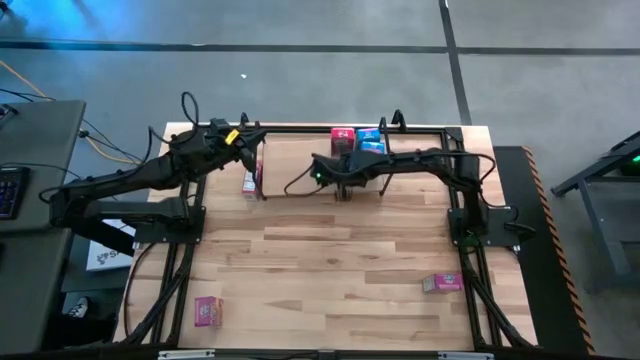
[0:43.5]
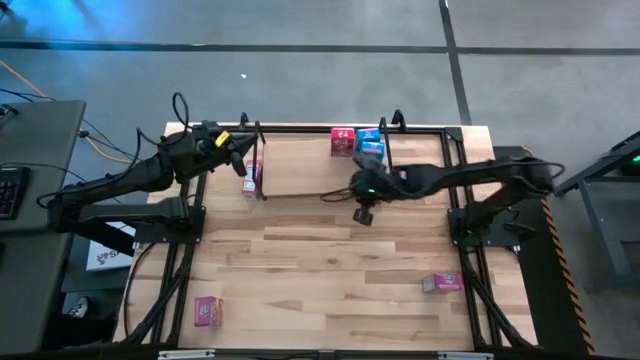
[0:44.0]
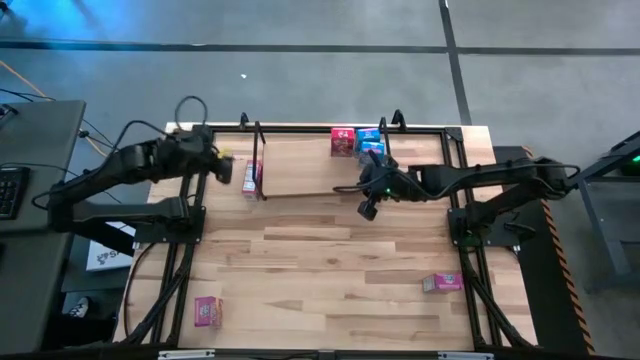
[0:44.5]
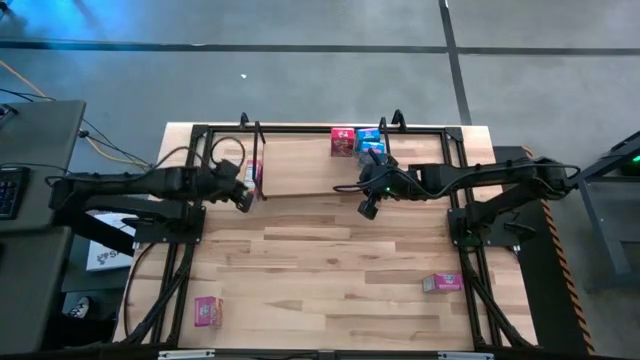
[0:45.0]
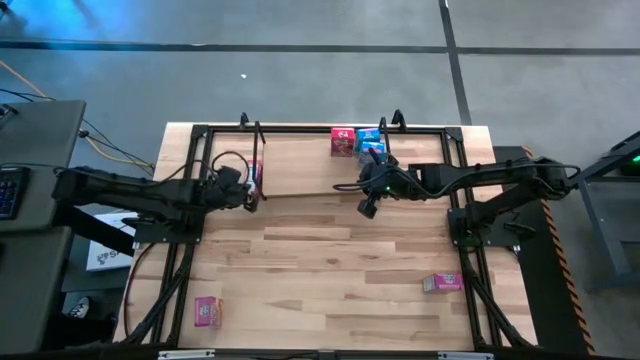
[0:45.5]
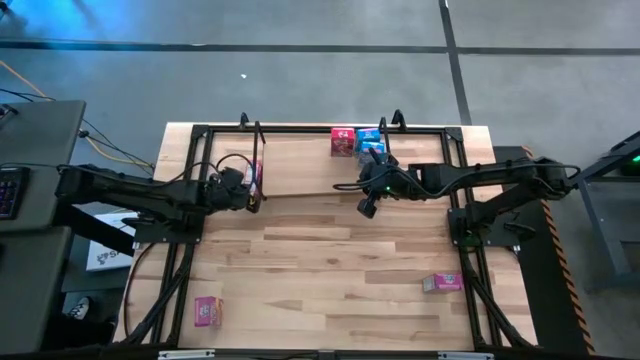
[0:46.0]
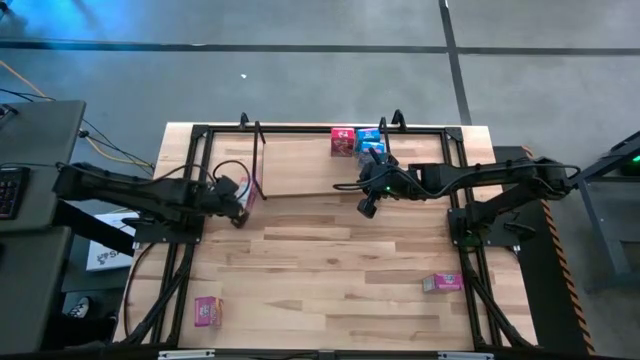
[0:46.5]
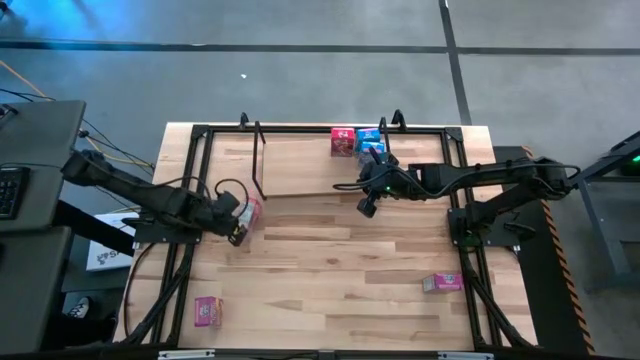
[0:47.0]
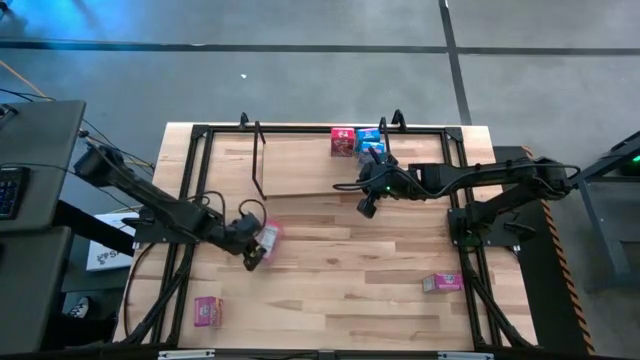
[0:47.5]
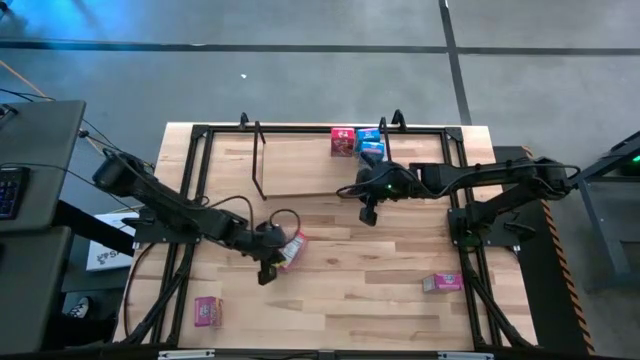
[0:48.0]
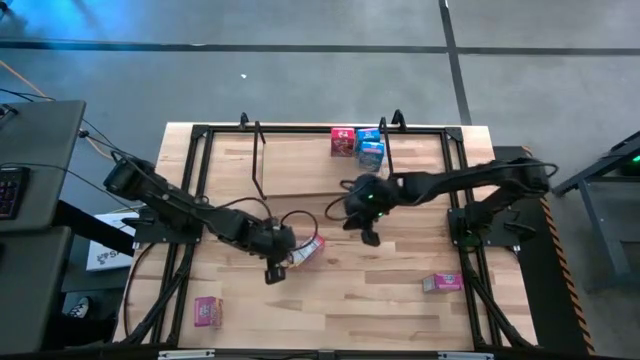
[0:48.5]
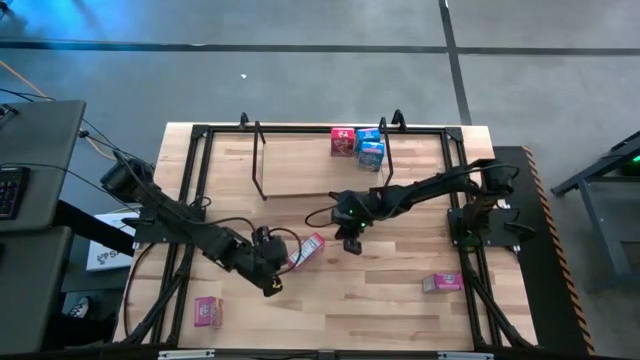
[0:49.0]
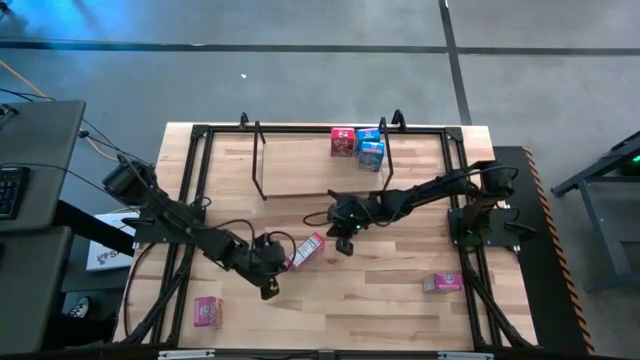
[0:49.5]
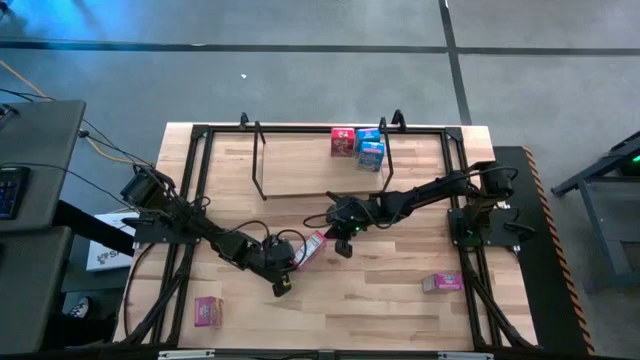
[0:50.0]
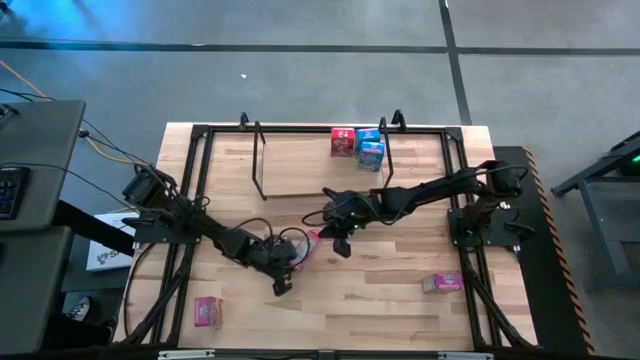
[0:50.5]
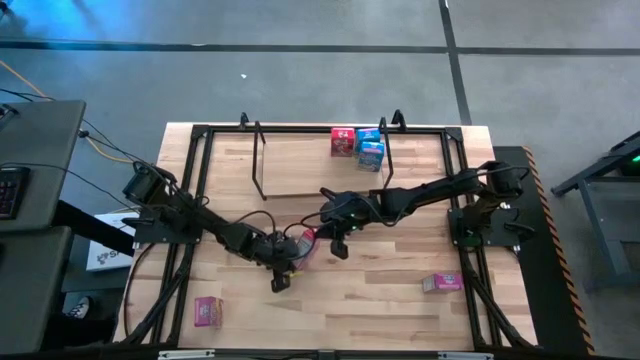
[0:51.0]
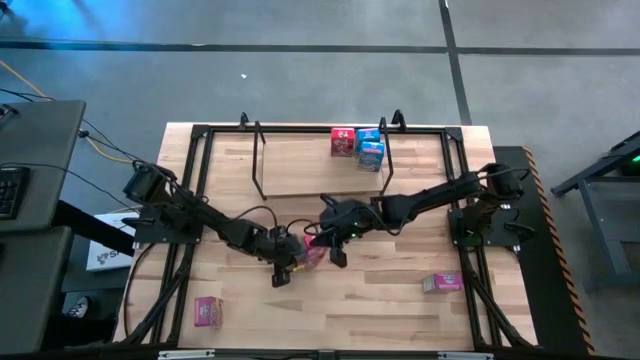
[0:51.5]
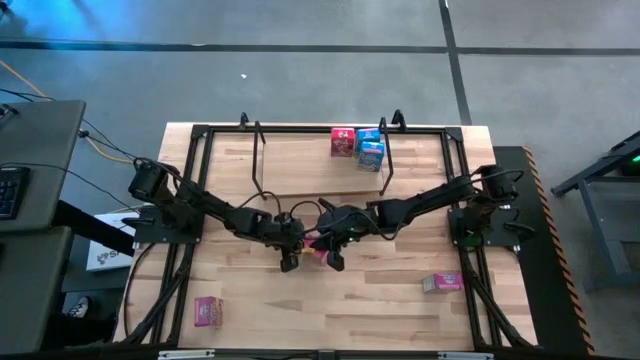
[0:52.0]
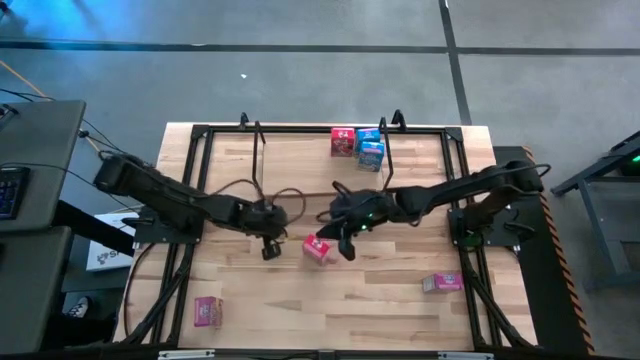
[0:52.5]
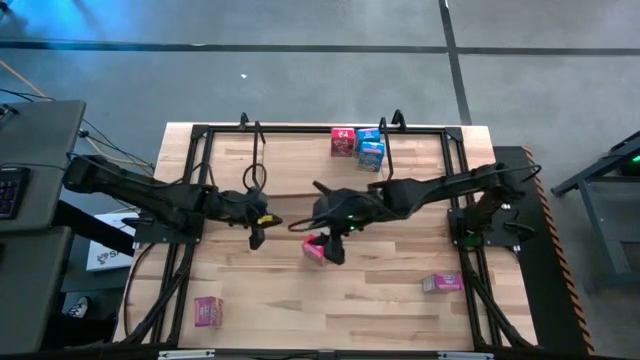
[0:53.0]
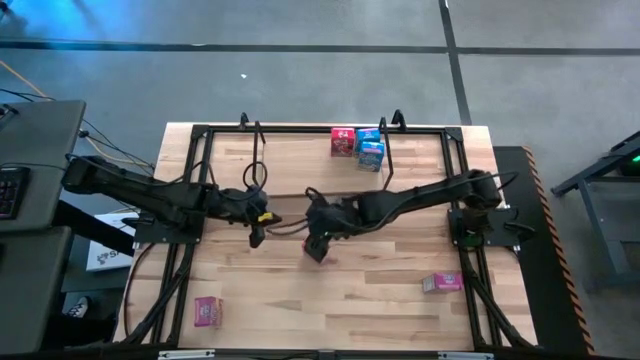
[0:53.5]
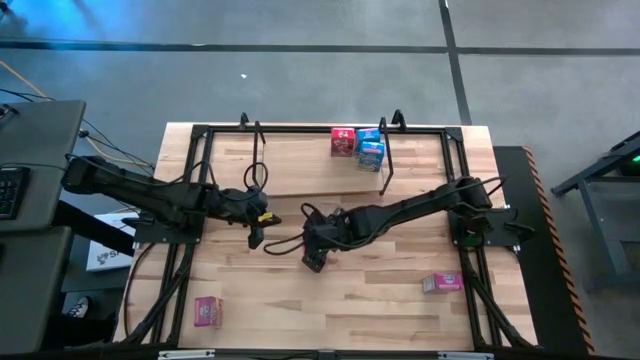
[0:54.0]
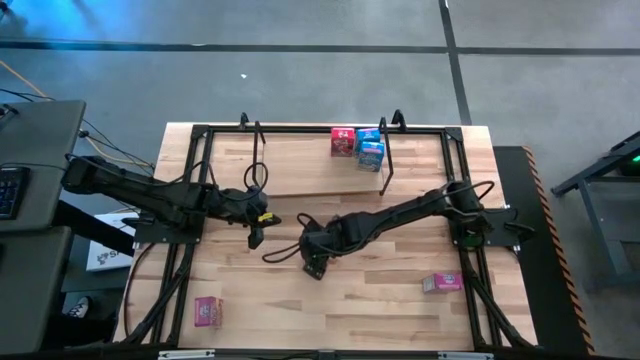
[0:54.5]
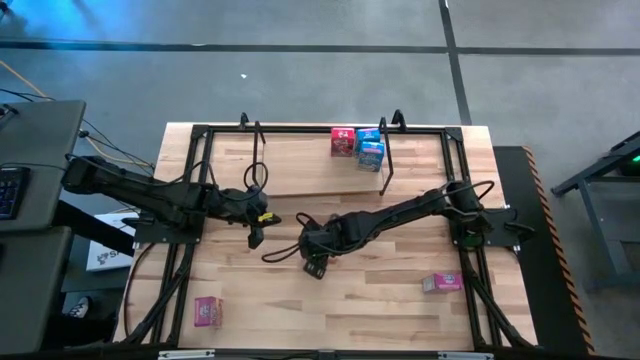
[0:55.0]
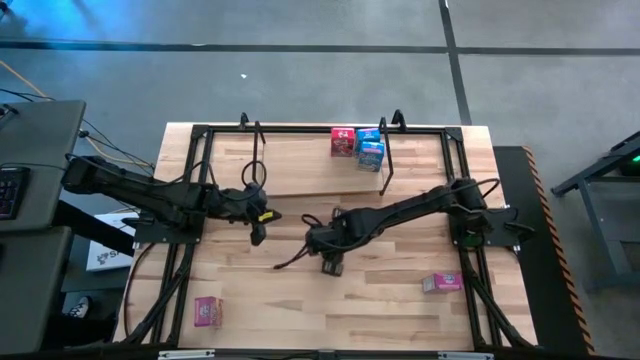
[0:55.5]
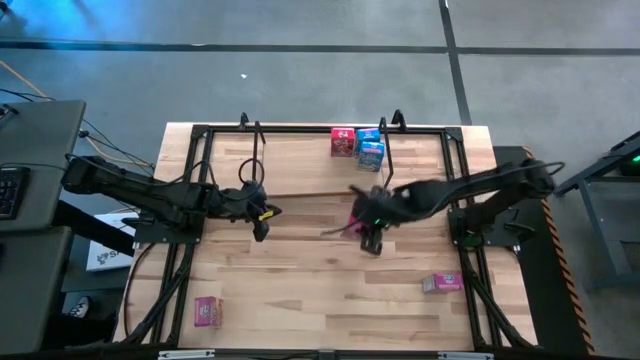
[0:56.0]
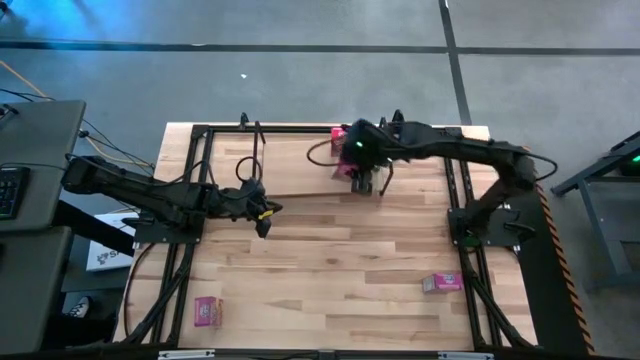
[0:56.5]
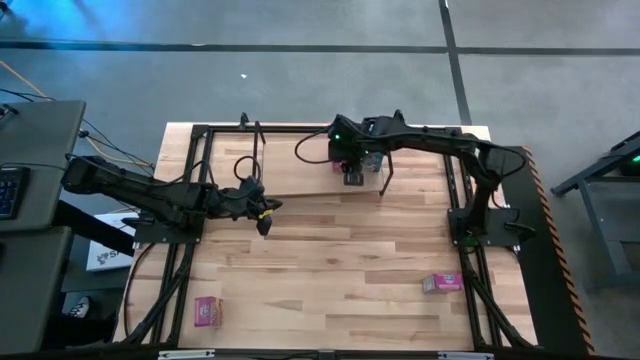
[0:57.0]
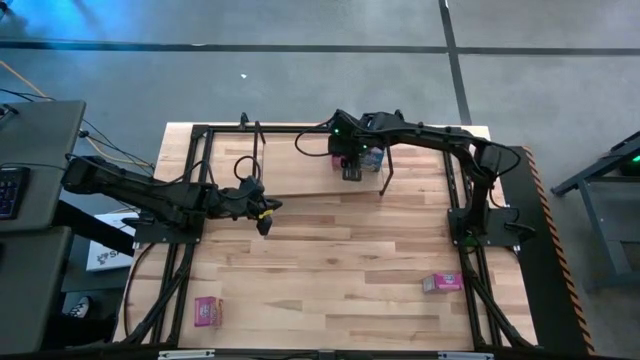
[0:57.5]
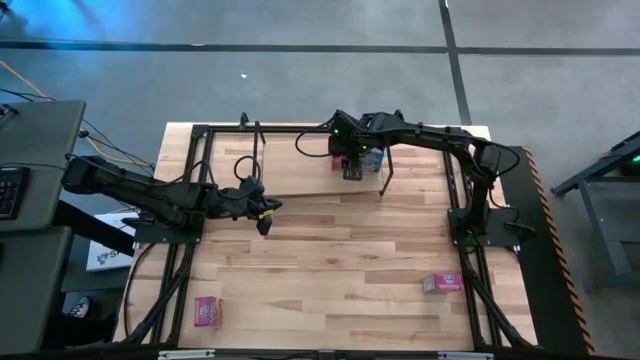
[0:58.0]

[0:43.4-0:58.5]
Task: Stack cereal on shelf
Put the red cereal box on the shelf aligned with the other red cereal box

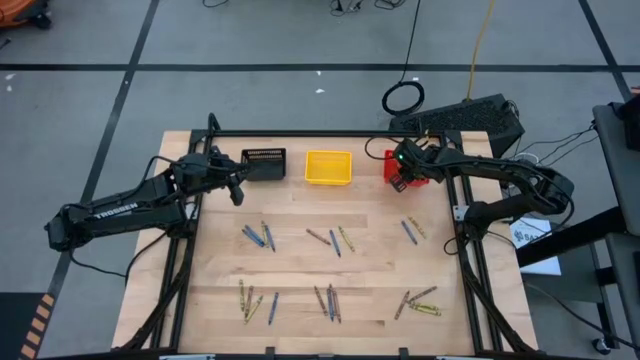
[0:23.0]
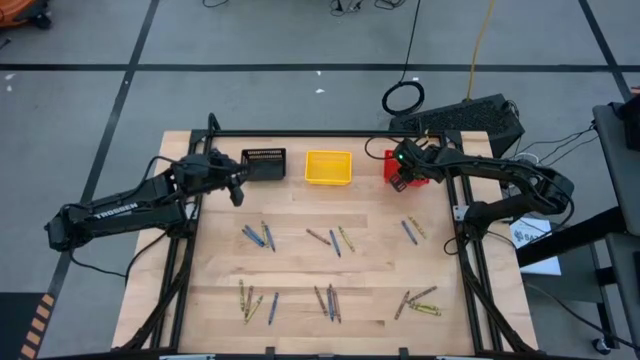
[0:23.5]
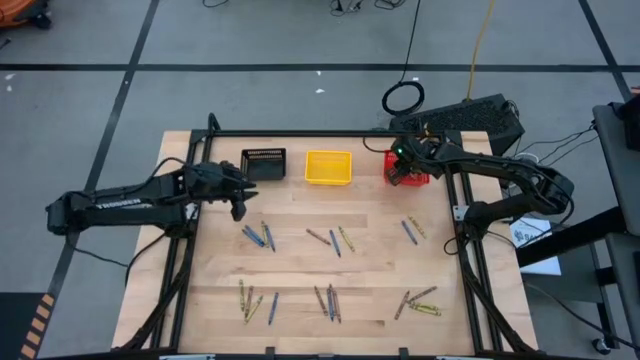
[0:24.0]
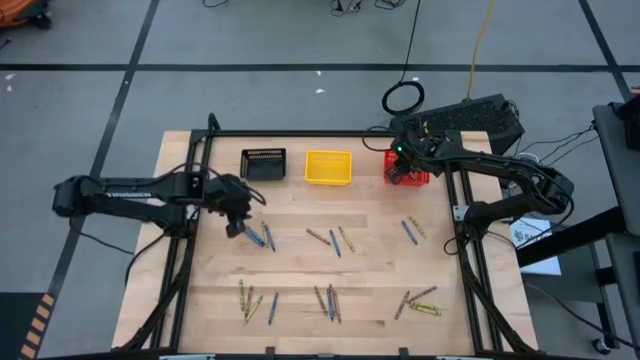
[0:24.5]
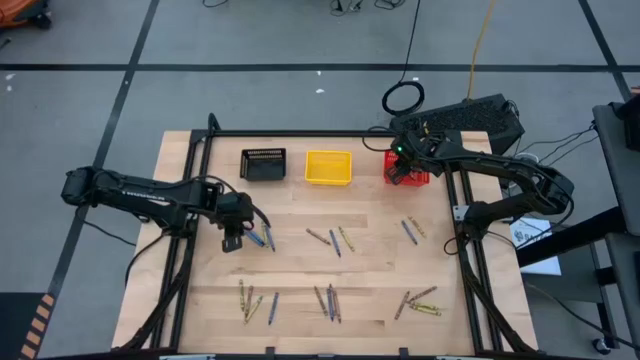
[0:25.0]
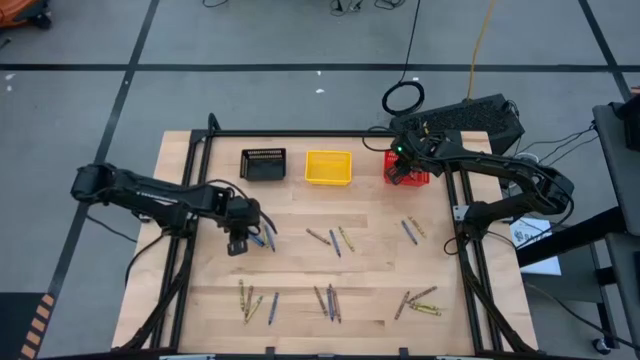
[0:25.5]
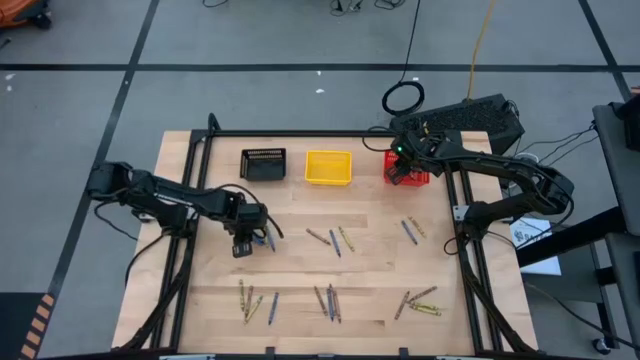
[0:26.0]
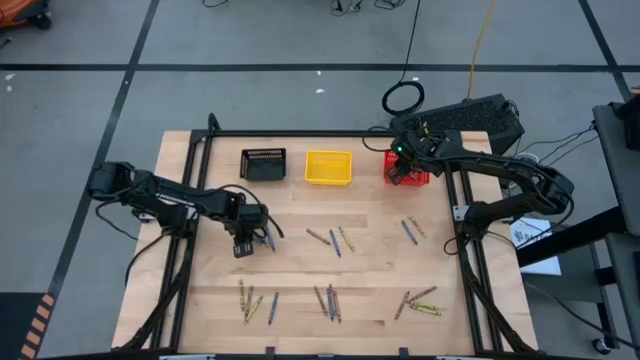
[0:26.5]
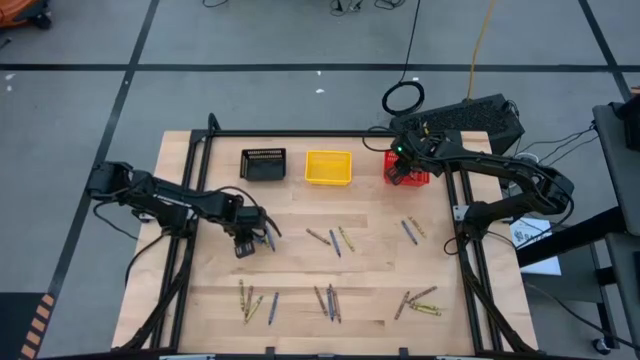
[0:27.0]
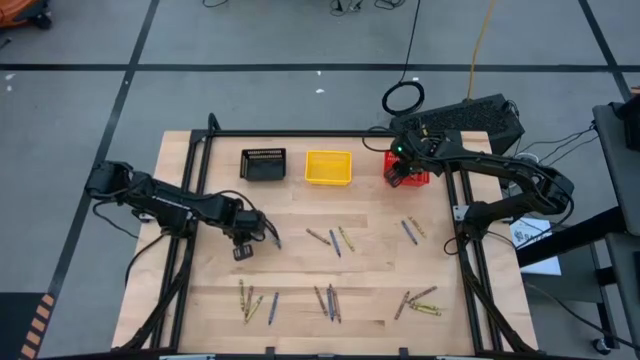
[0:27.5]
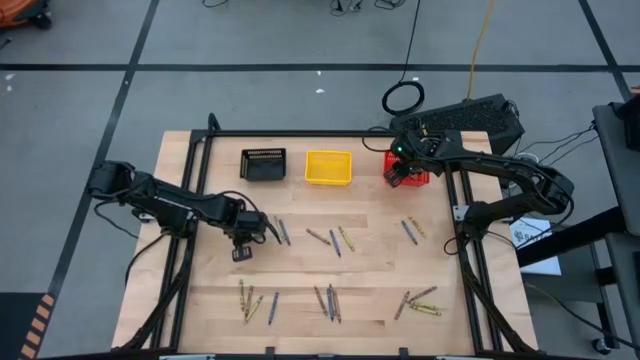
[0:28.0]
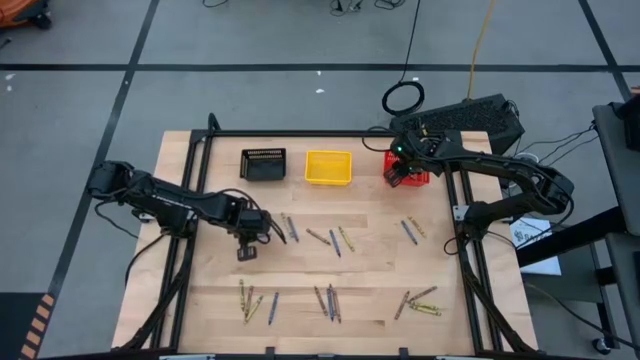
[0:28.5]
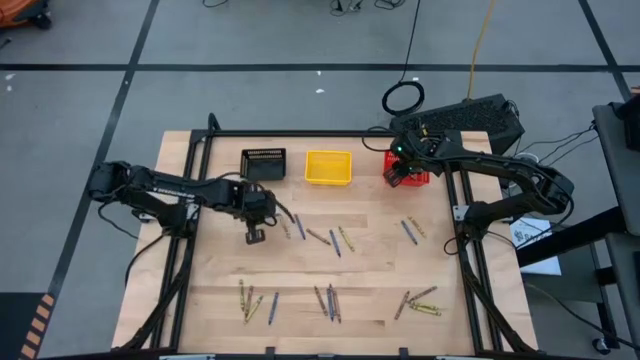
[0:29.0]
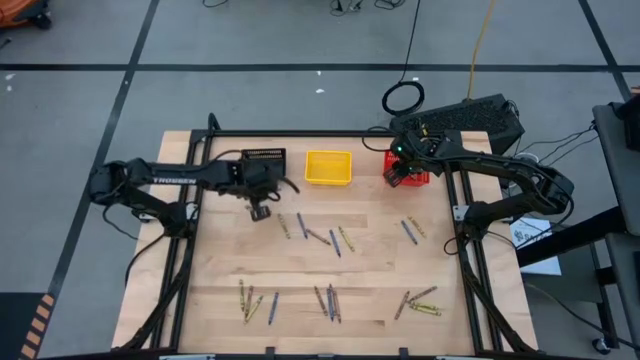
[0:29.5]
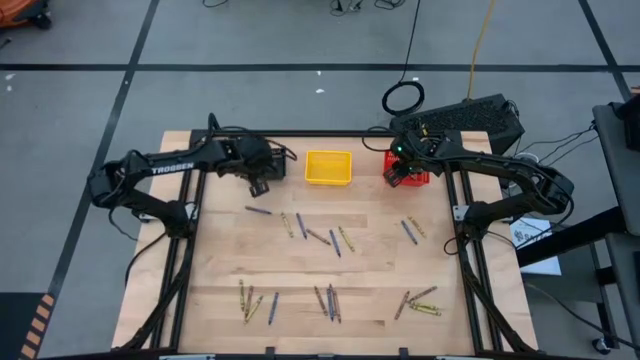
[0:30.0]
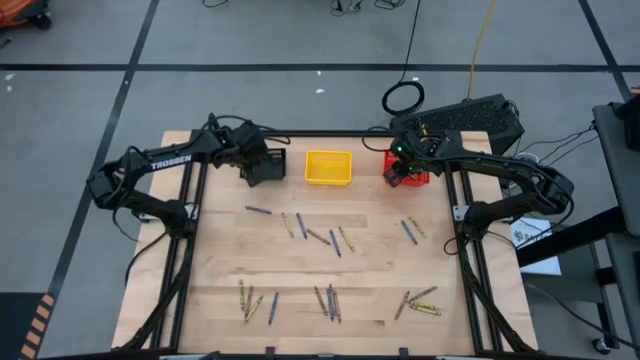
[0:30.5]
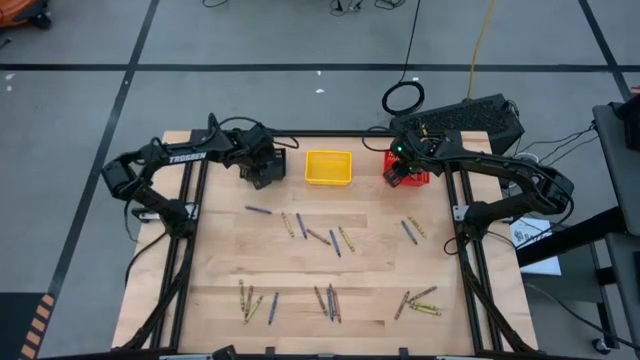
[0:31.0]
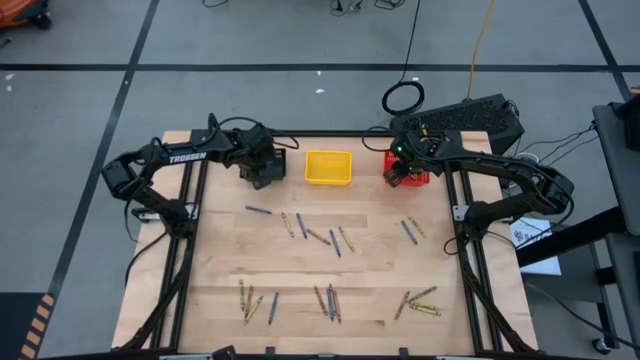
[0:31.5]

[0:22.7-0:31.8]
Task: Sort crayons
Put the blue crayon into the black bin
